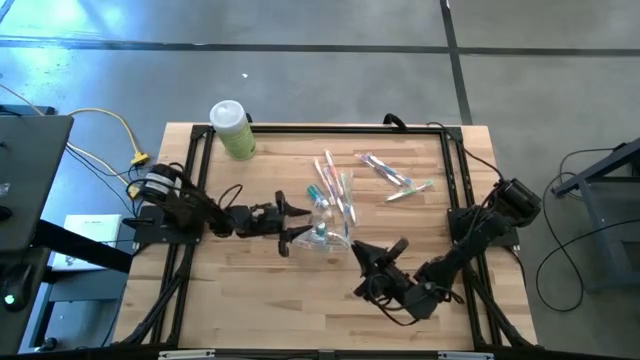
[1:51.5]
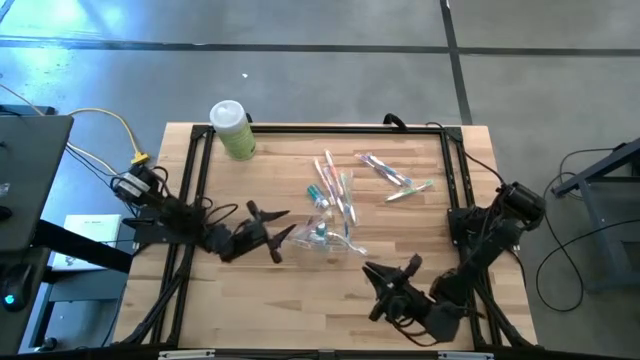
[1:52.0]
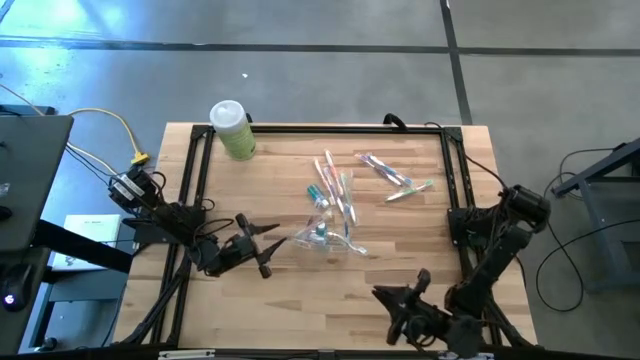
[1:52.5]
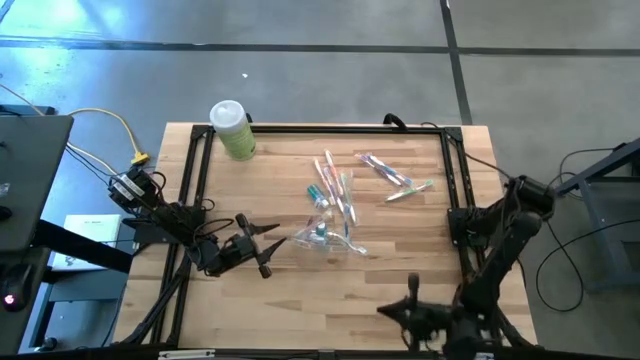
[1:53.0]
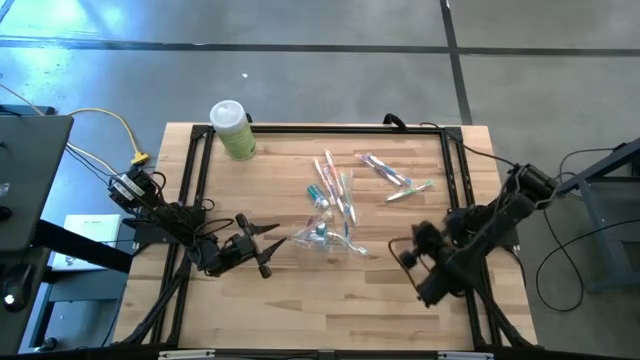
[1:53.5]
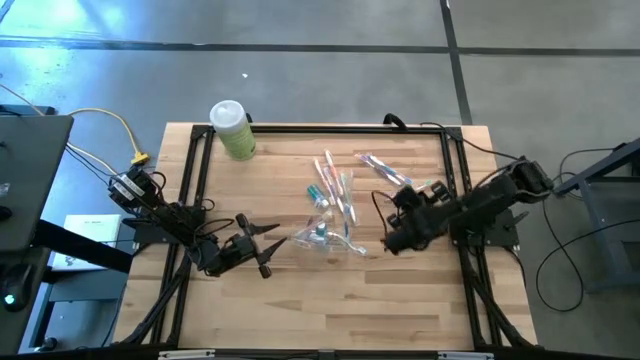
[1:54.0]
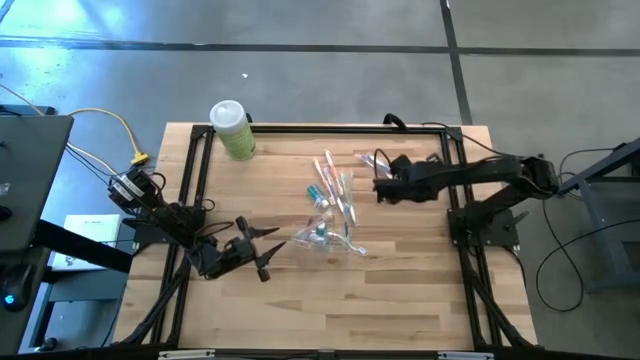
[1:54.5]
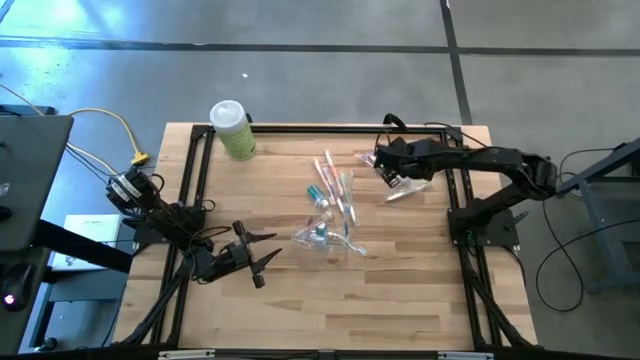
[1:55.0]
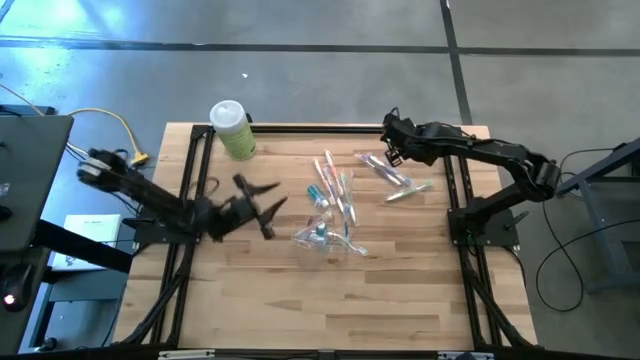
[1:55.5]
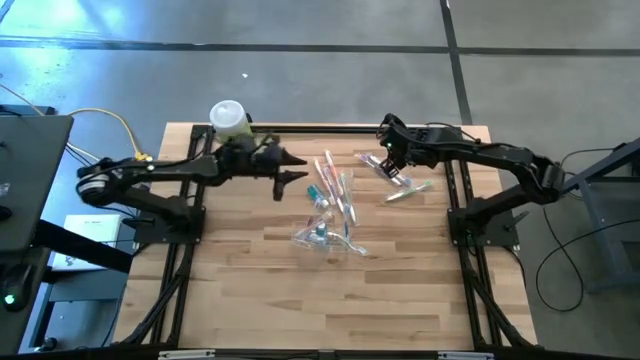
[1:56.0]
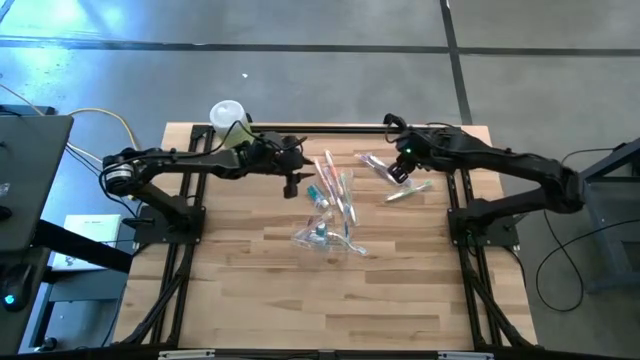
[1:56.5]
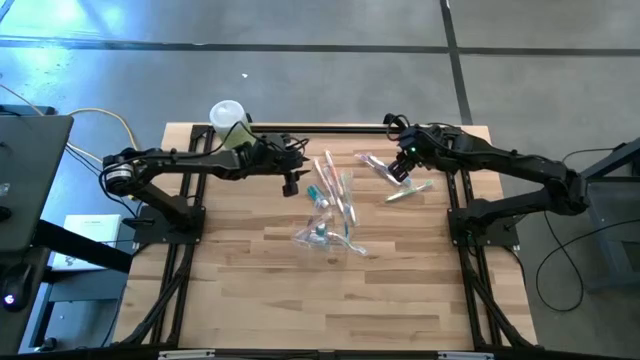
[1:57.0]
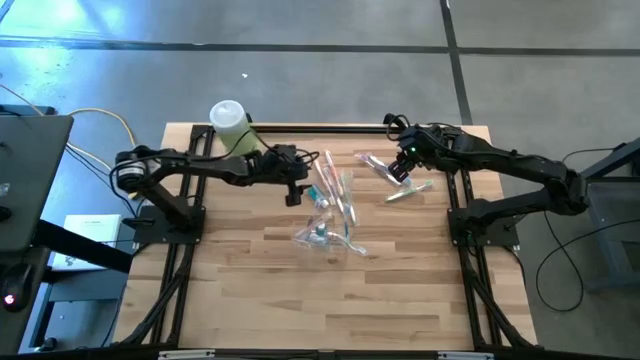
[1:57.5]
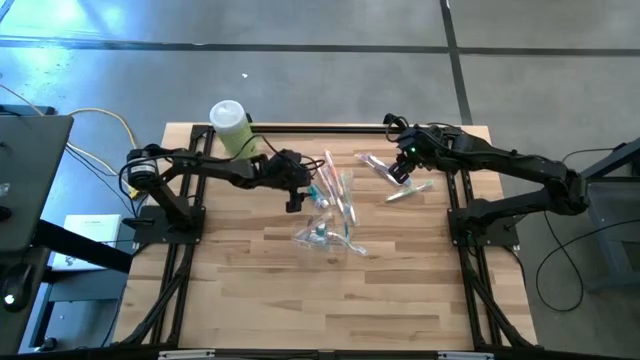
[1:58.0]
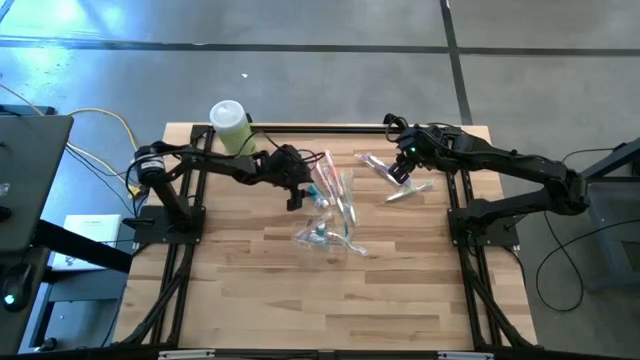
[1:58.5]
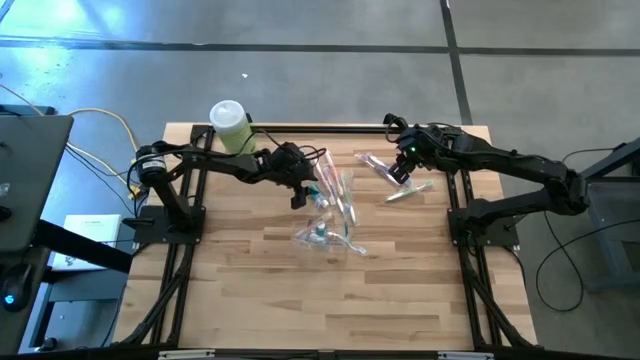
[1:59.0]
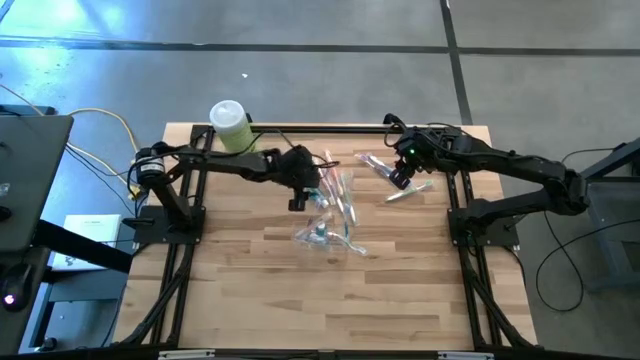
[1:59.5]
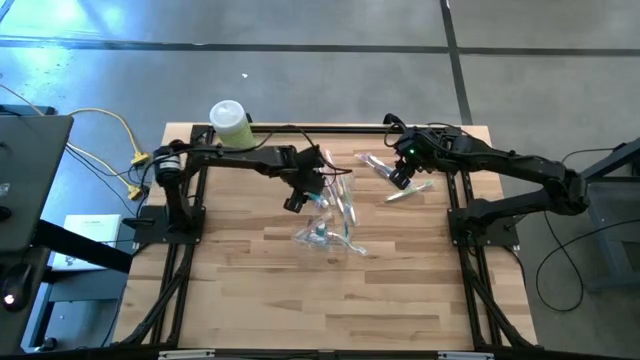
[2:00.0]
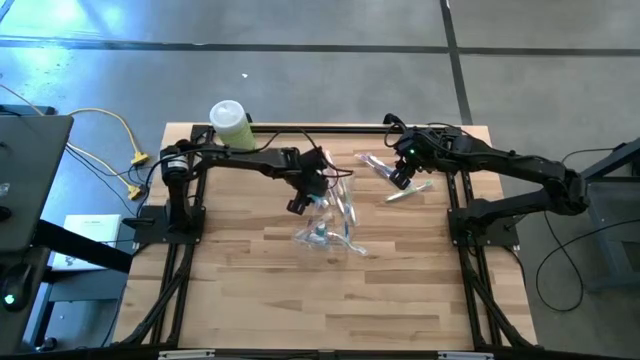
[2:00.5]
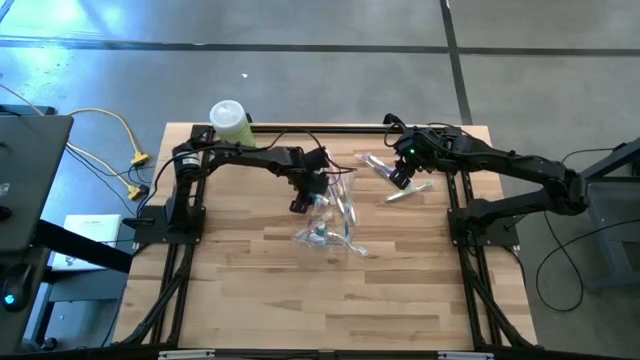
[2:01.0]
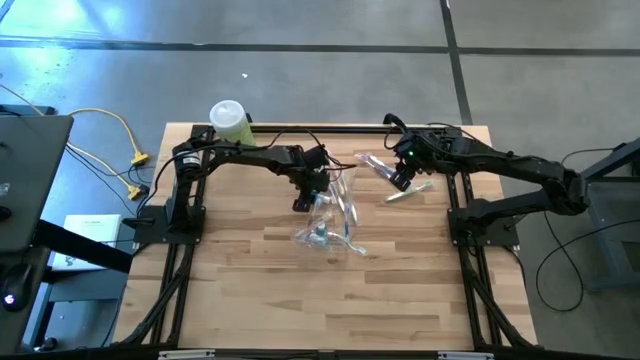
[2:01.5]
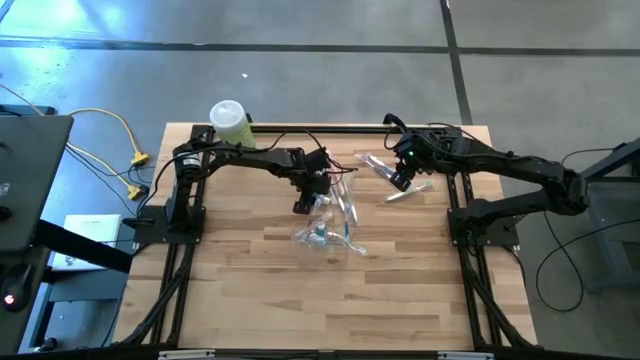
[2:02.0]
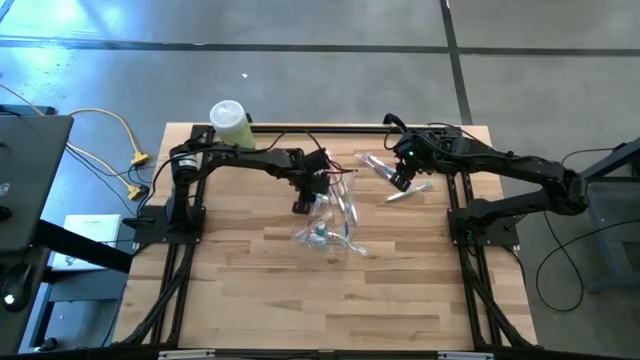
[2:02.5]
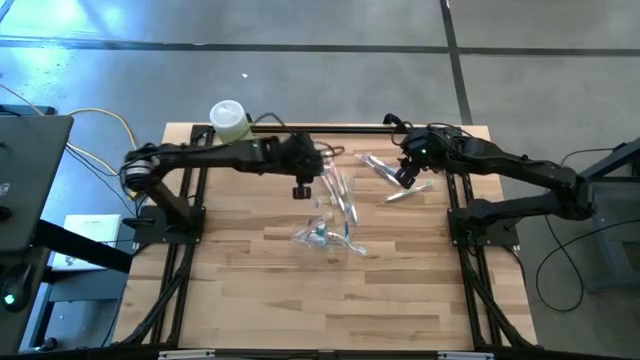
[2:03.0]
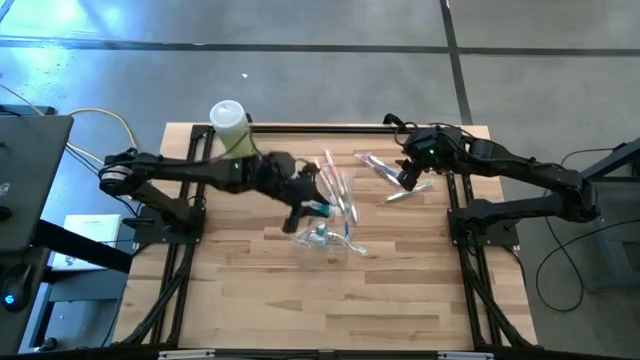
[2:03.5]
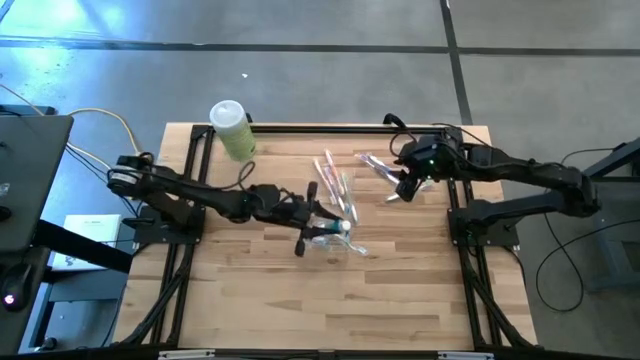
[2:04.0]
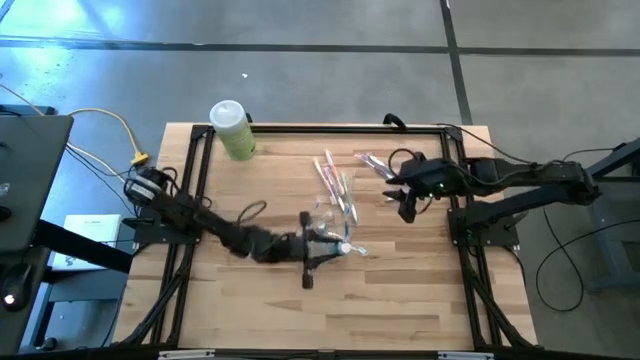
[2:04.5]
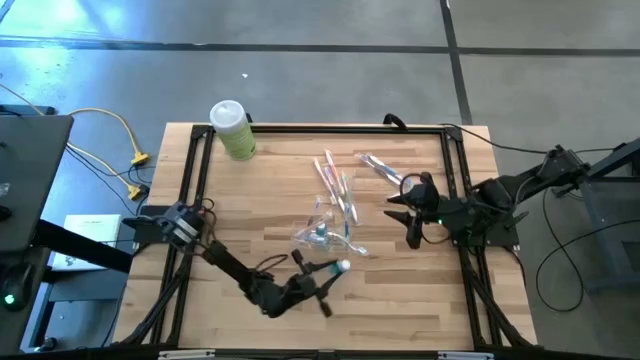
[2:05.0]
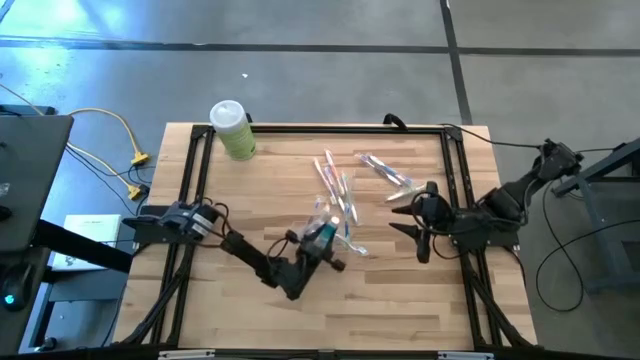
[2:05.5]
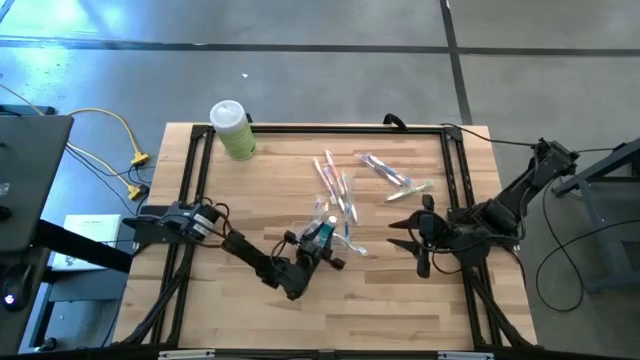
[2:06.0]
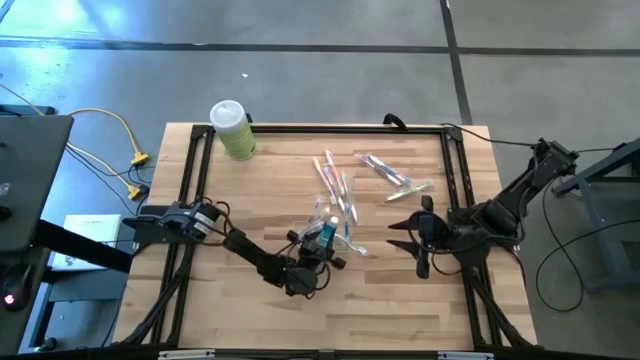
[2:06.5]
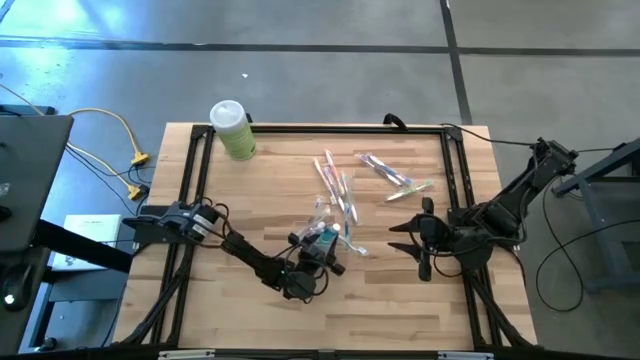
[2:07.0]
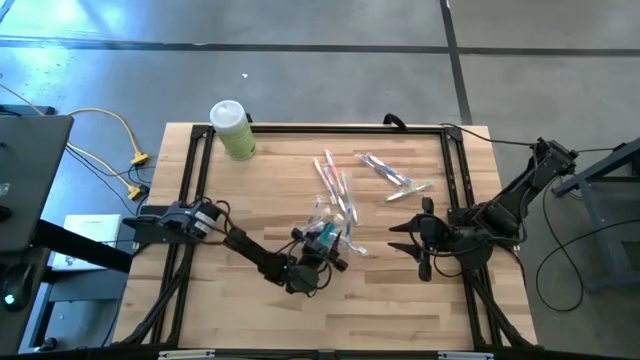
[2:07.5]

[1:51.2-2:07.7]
Task: Pick & Place toothbrushing station
Put the mouthwash into the transparent organizer

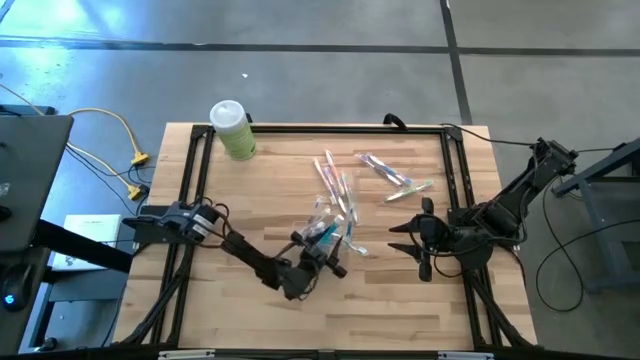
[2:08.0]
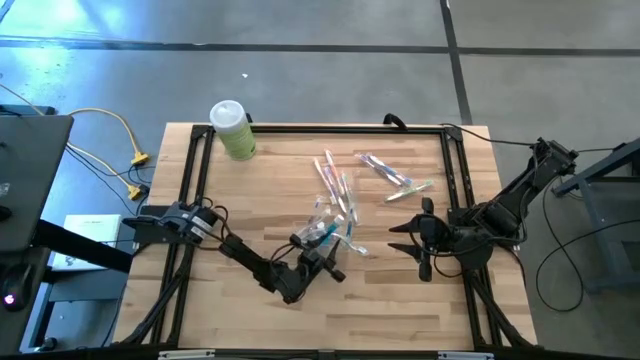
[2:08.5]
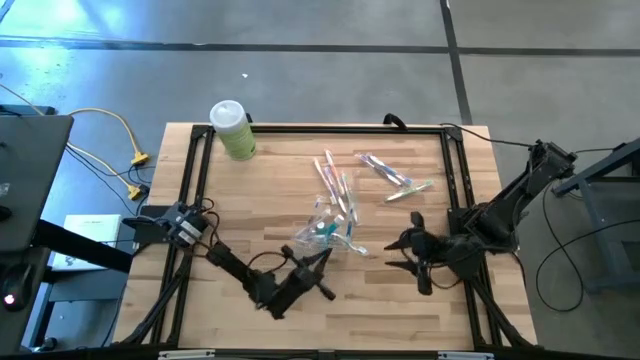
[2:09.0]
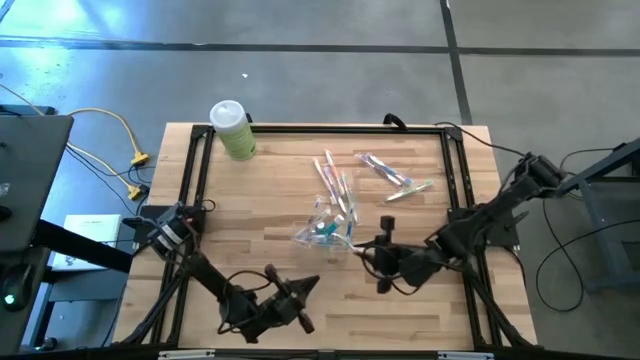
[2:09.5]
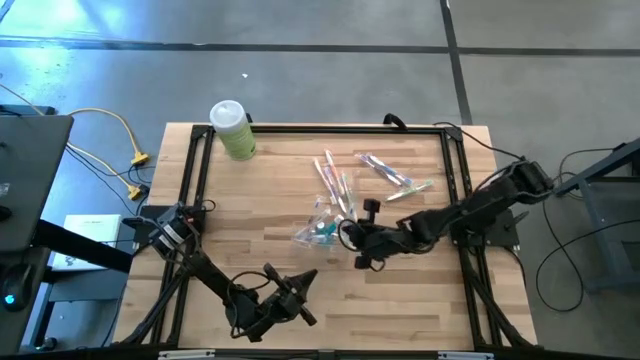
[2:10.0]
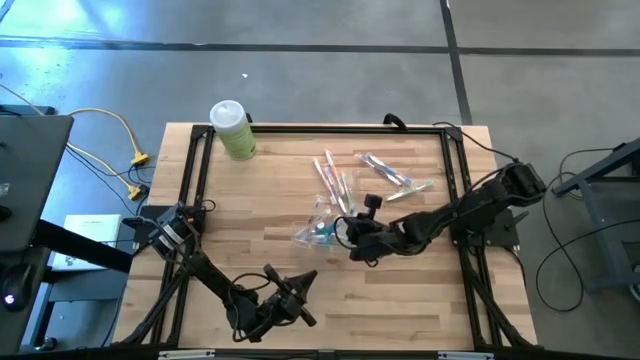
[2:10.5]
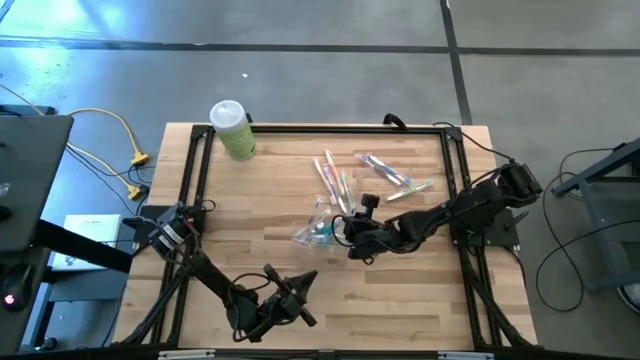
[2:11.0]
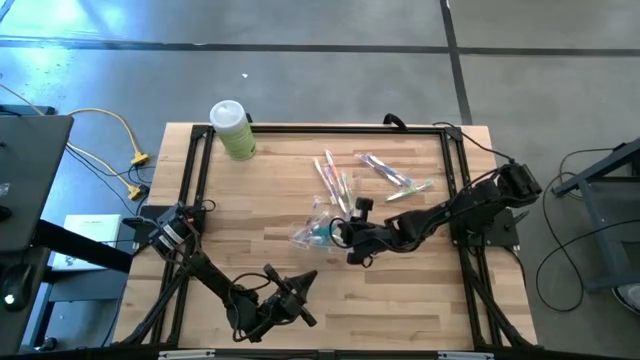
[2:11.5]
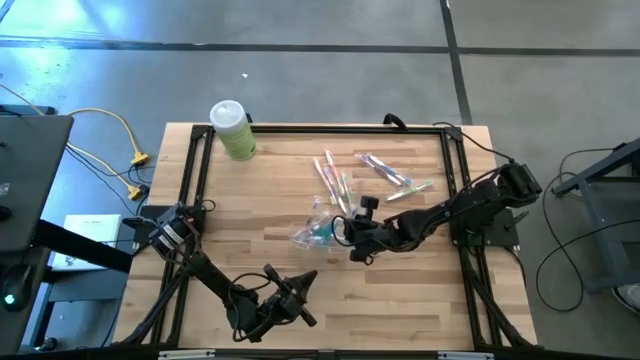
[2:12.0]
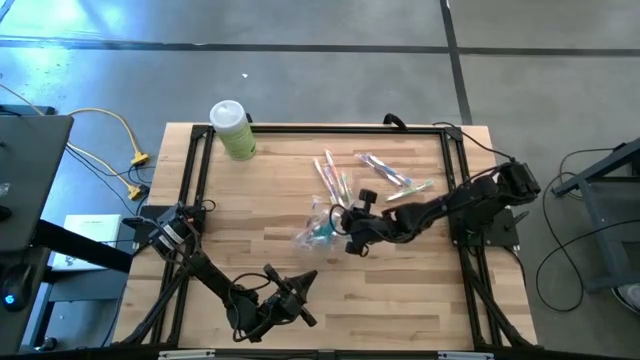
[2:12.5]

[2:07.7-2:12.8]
Adjust the mouthwash into the transparent organizer
